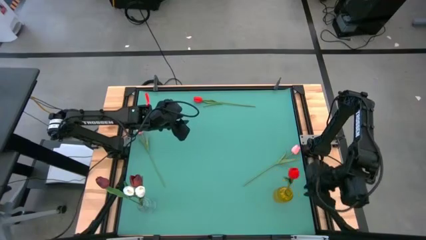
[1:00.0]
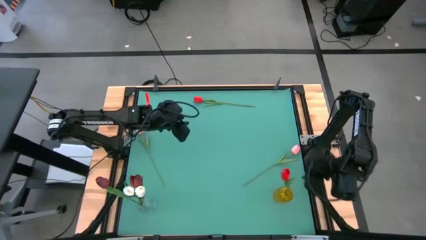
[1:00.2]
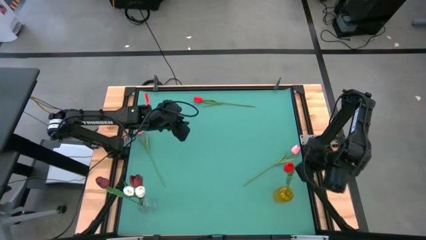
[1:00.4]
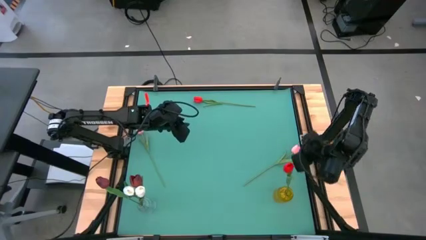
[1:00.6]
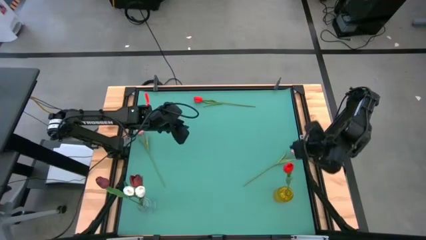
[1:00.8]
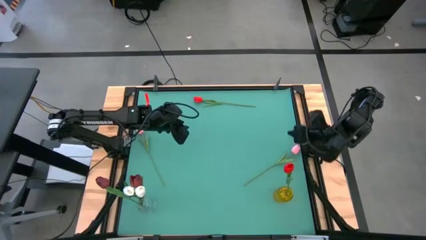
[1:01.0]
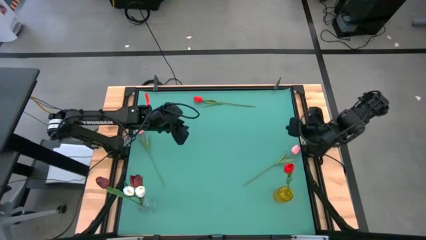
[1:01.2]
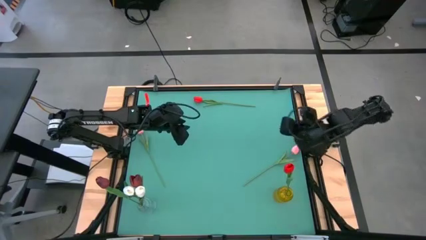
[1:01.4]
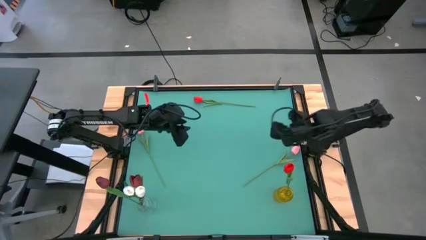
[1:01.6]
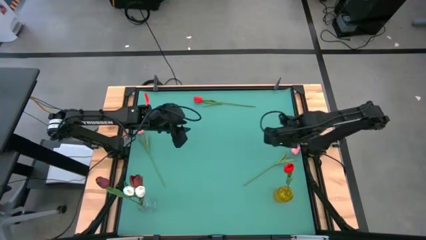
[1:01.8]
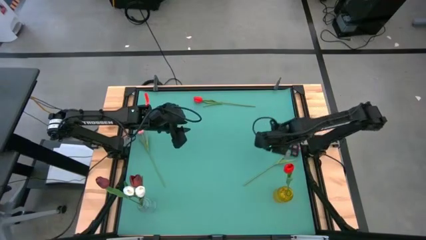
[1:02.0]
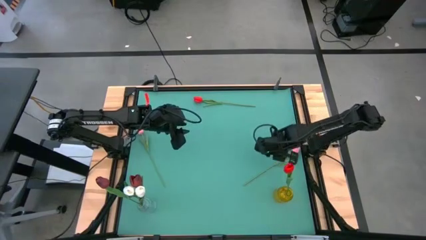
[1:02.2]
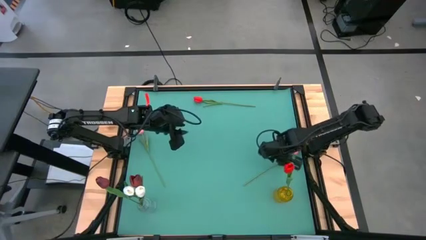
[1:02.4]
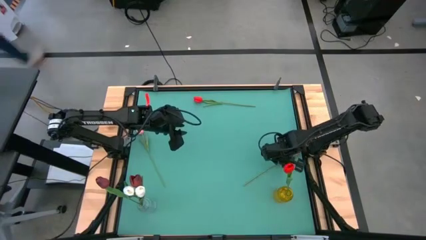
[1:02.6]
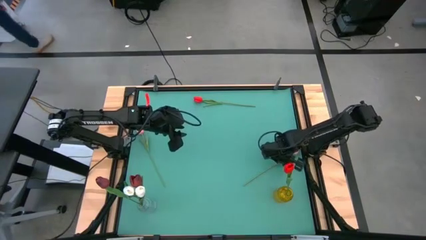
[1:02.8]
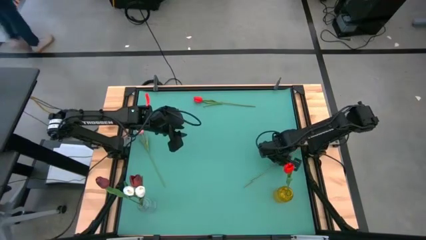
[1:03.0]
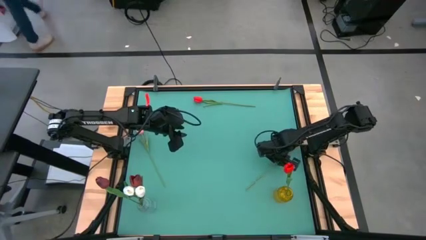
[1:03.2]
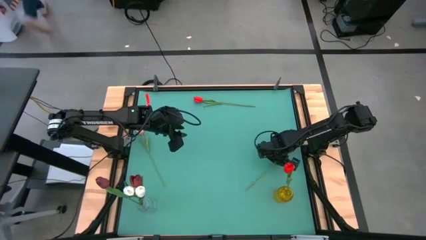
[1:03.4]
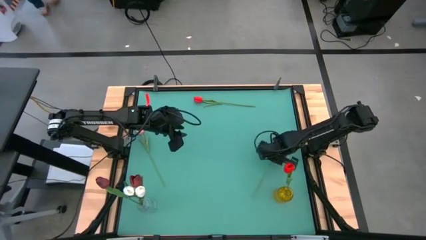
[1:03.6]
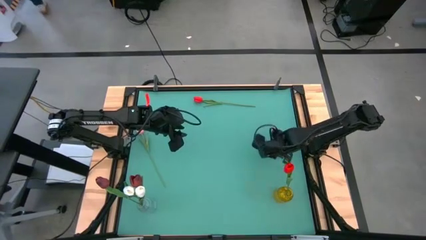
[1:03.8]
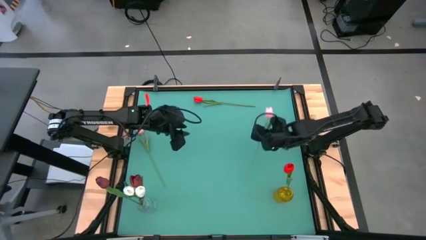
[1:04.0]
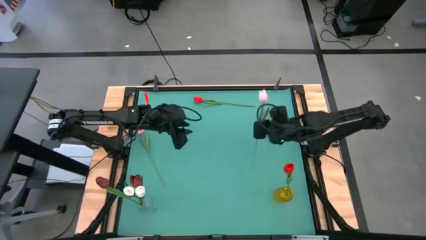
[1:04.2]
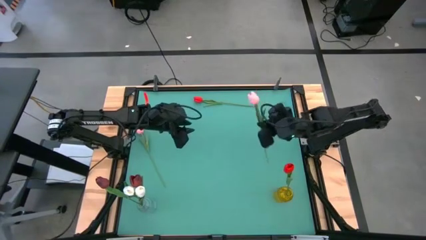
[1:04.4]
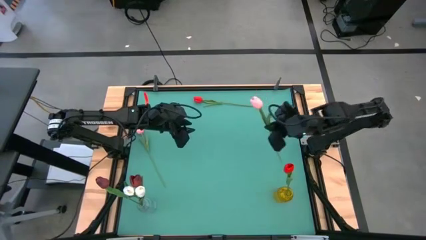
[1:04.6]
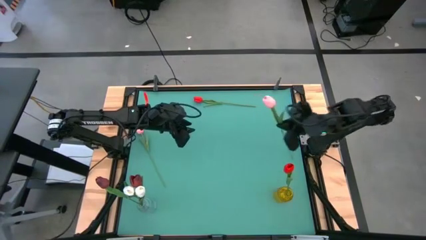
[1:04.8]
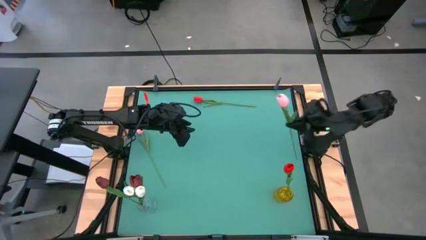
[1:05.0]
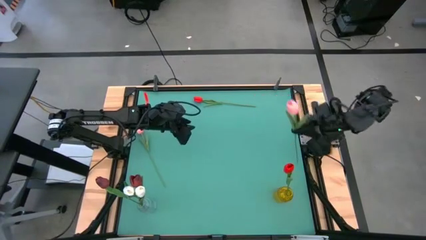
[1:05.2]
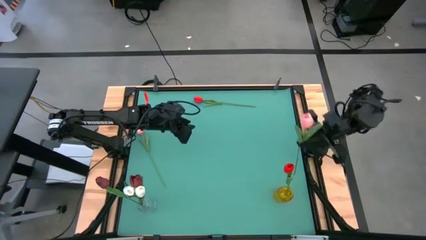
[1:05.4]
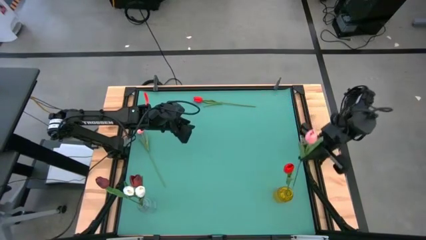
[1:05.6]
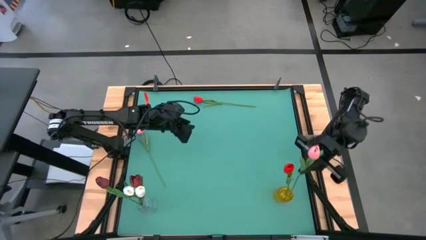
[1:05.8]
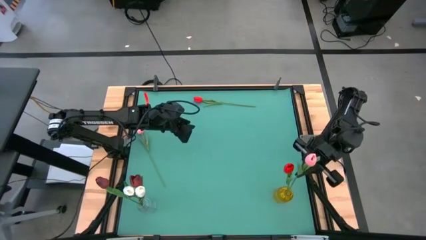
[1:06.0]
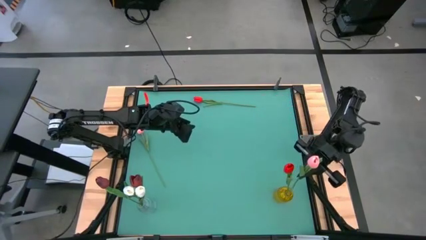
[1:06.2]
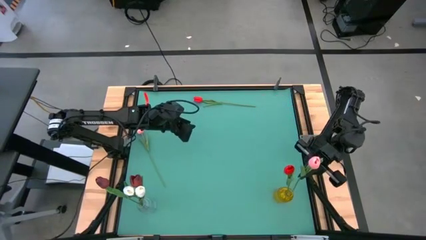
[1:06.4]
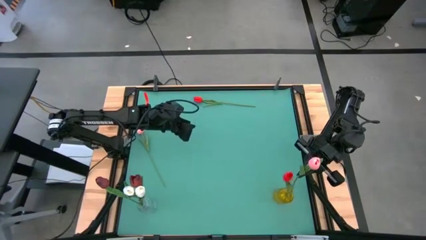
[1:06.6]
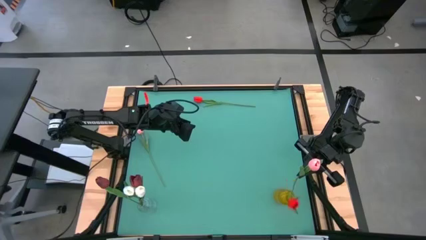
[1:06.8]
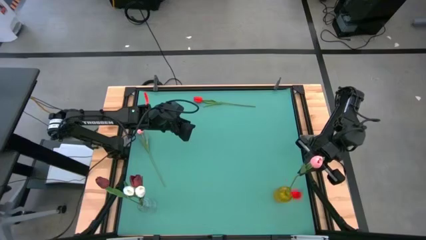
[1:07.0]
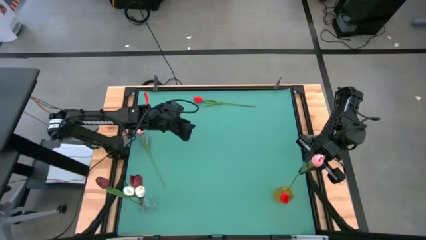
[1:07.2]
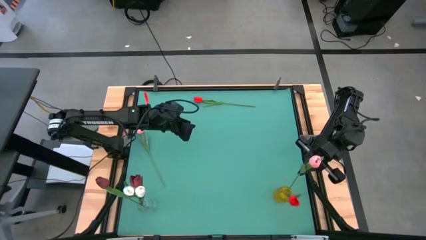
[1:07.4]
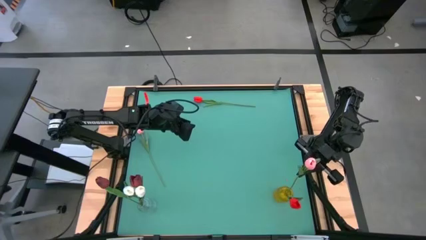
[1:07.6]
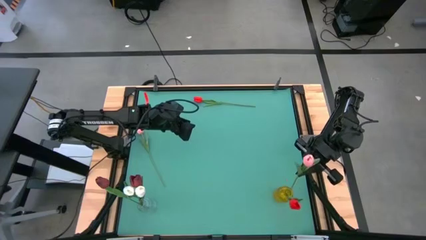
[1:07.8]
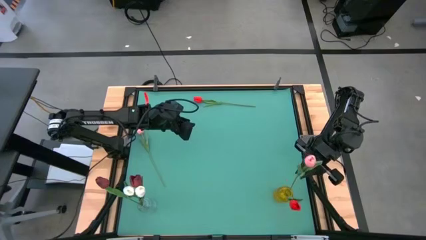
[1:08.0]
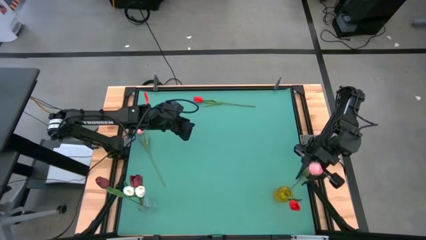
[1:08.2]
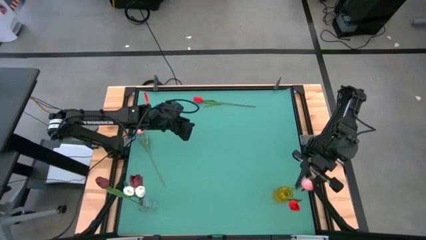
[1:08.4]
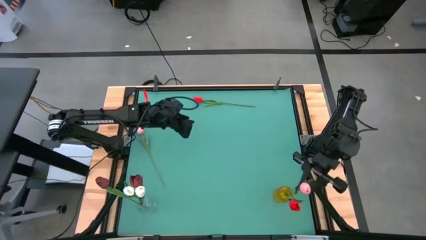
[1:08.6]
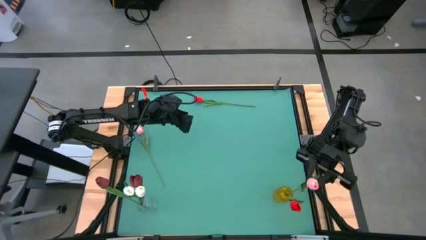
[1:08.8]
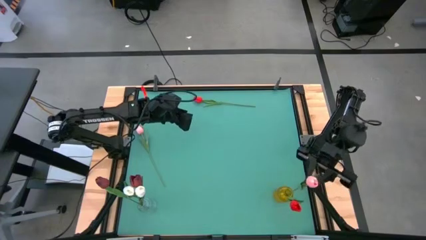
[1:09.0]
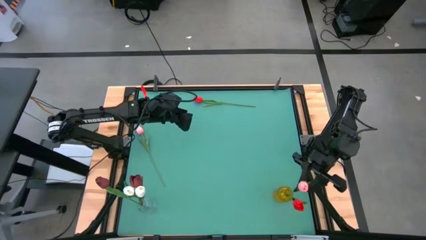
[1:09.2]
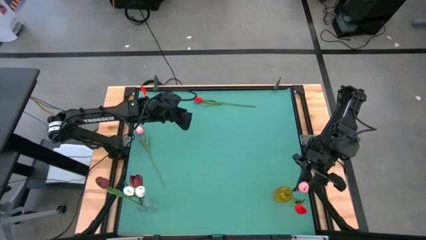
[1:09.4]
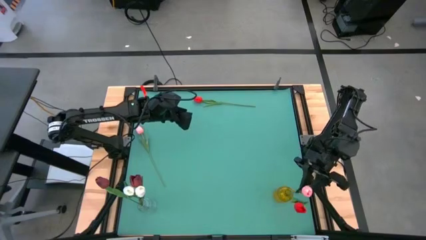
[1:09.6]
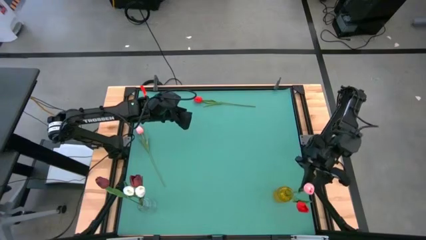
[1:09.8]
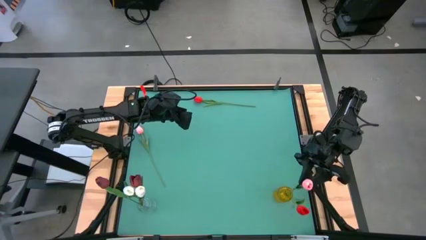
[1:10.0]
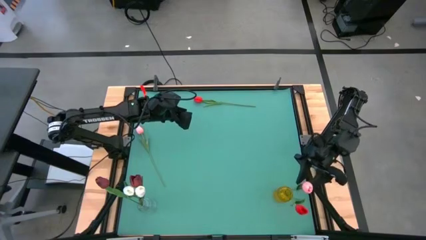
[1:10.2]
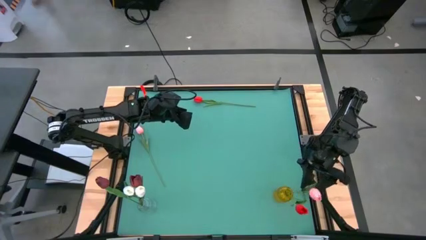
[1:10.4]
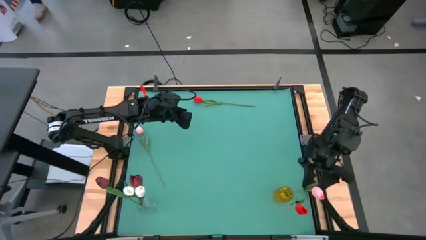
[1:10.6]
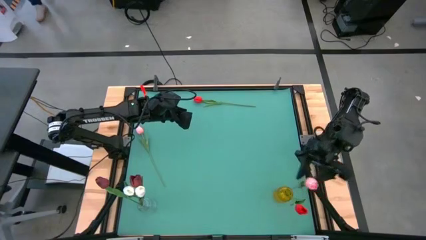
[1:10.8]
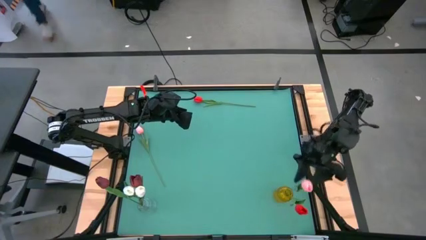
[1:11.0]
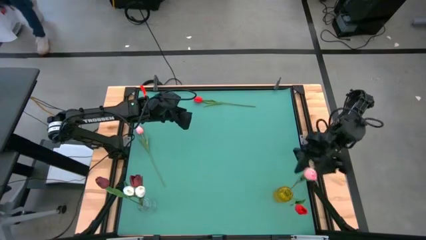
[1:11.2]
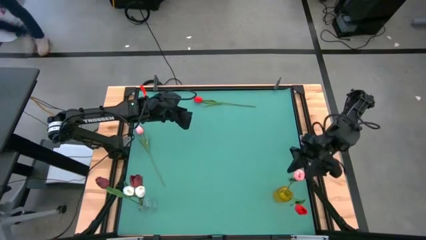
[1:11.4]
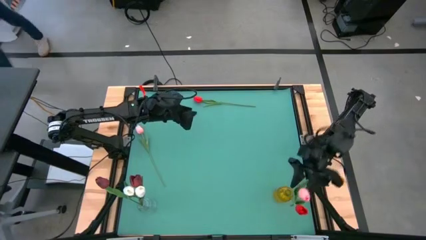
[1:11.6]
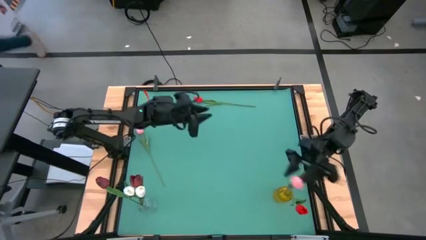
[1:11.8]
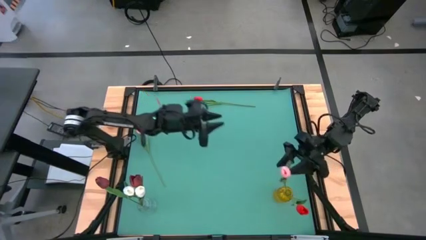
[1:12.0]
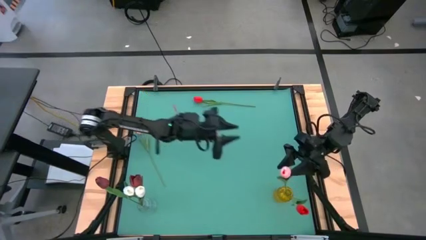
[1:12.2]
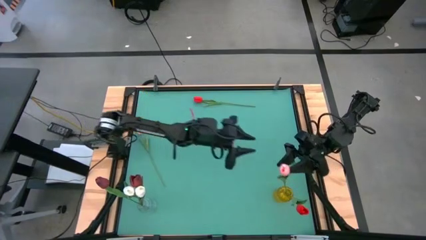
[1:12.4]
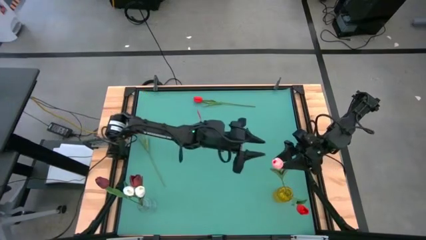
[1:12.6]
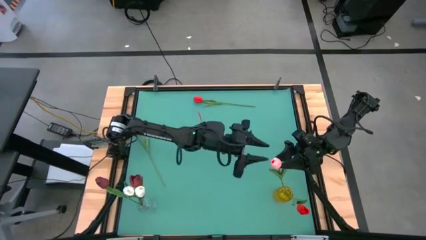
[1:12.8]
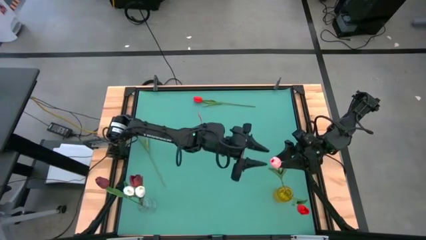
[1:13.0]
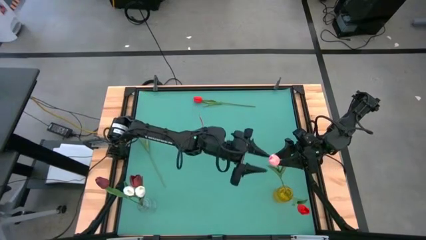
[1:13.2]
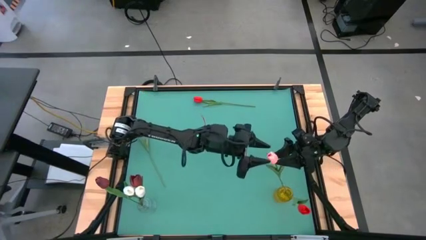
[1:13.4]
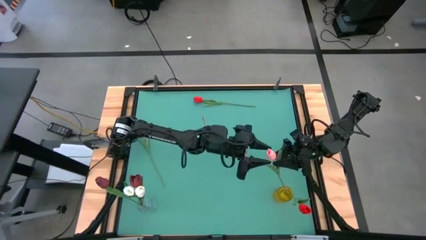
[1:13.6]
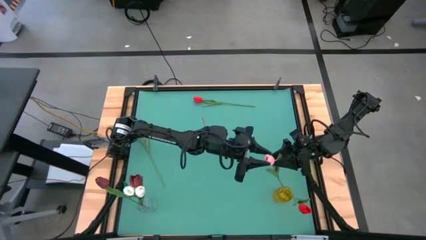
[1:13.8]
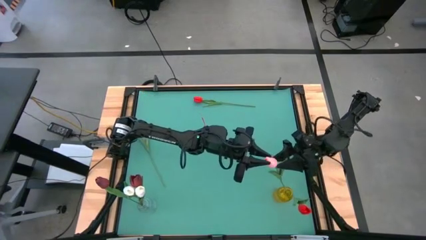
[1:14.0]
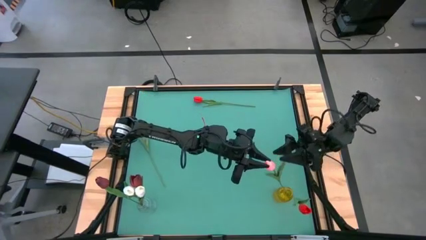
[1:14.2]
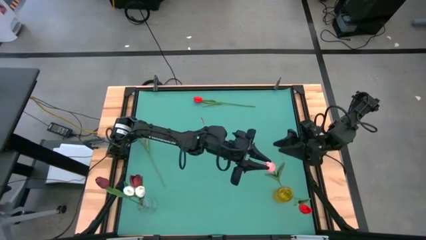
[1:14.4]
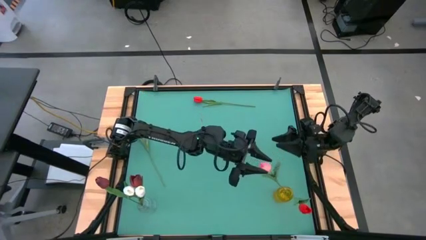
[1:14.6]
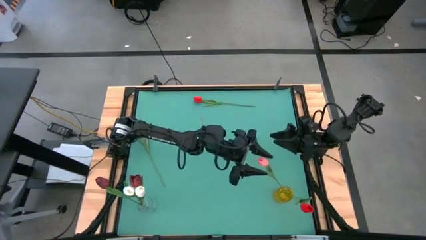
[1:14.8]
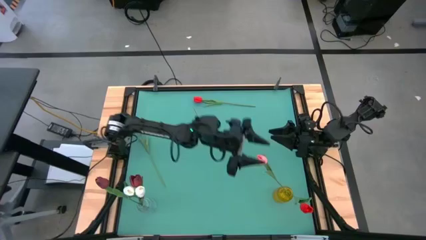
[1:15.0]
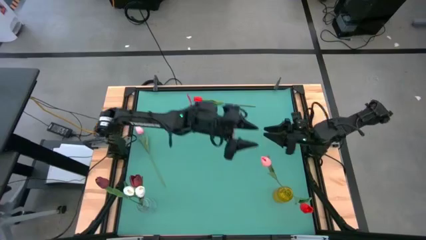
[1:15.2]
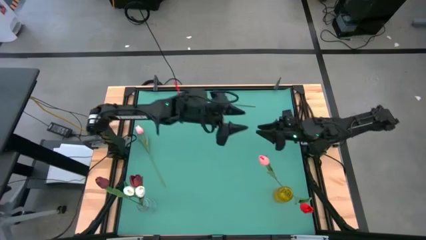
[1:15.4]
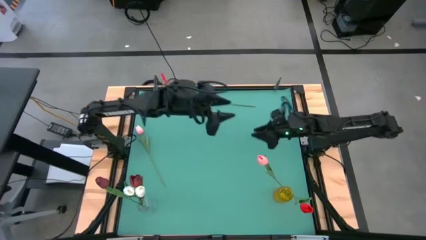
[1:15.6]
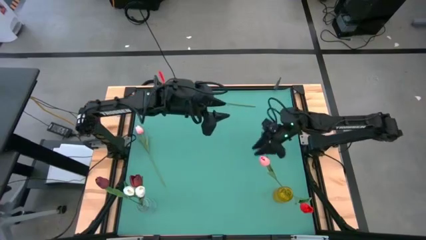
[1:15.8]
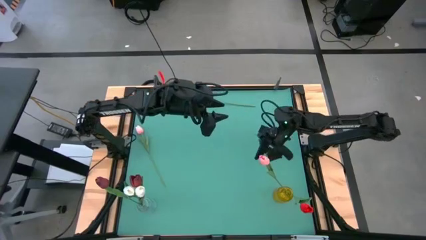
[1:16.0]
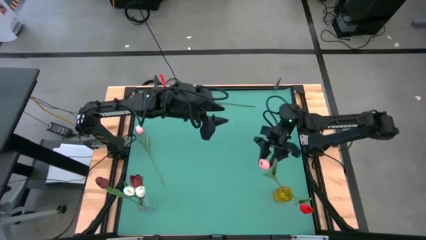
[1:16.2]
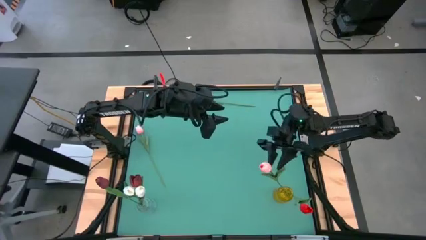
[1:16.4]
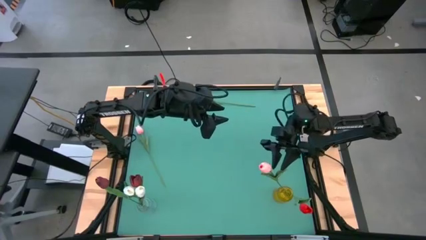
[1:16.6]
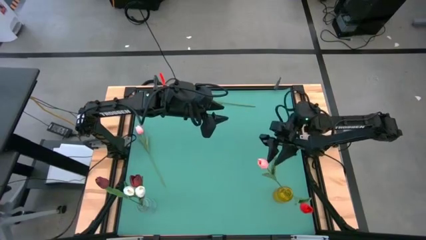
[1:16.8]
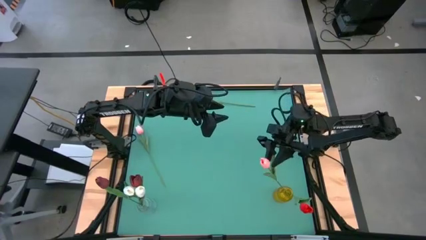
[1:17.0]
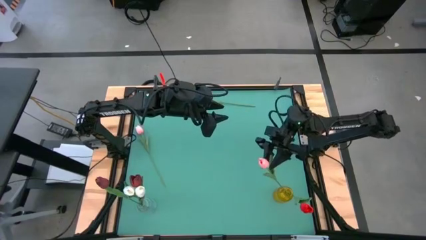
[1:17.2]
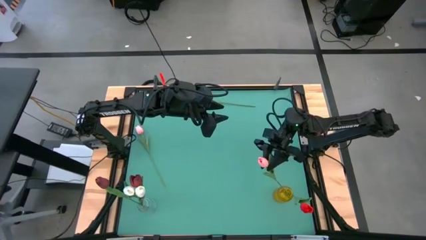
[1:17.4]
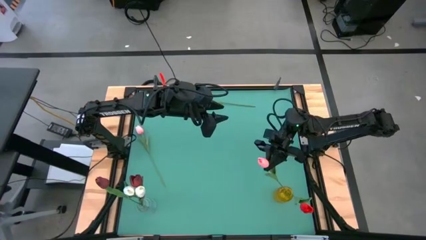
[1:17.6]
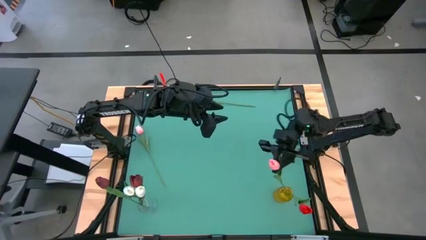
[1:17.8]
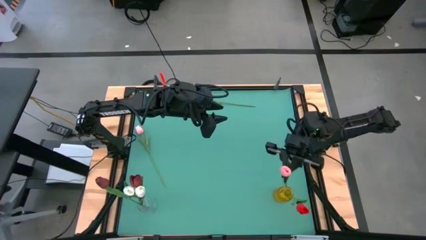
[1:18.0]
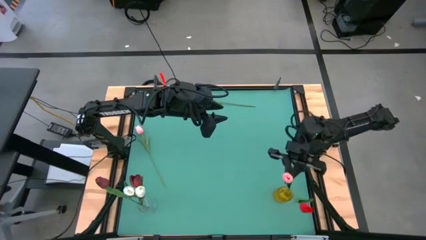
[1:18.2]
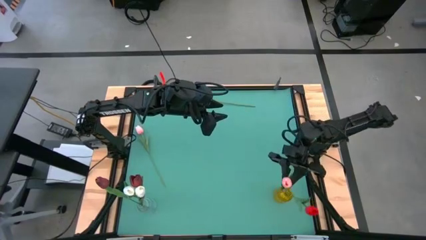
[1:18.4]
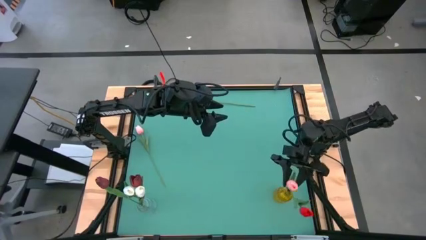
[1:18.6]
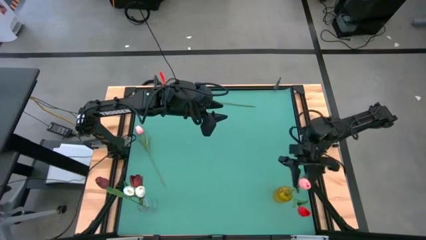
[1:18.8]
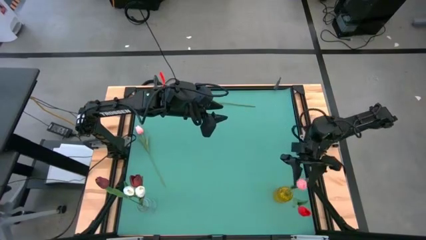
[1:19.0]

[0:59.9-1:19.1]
Task: Sort flowers into vase by color
Put the right pink flower into the yellow vase
